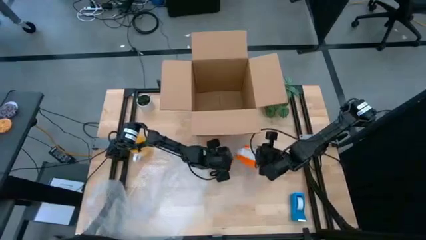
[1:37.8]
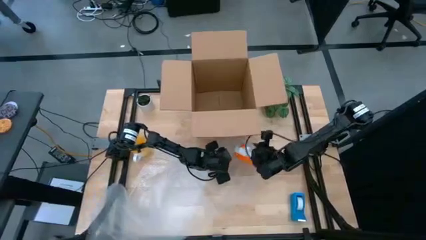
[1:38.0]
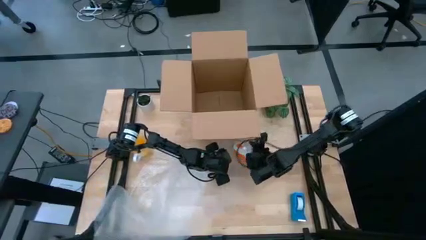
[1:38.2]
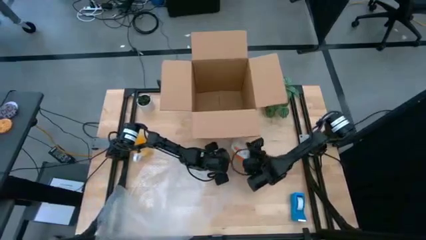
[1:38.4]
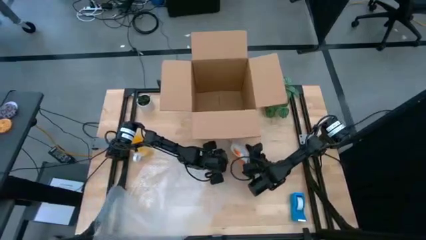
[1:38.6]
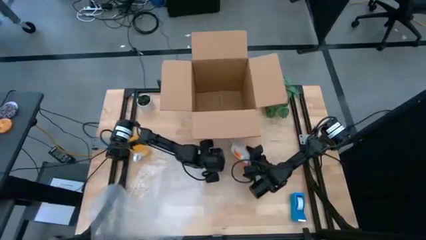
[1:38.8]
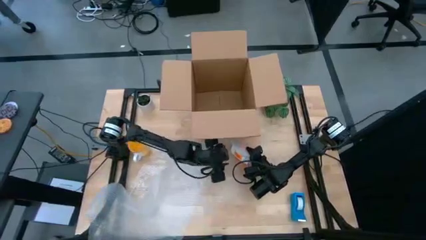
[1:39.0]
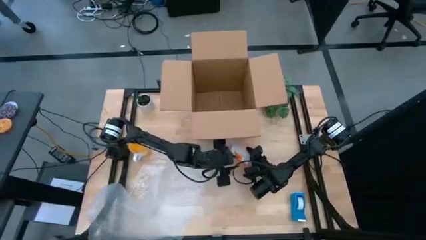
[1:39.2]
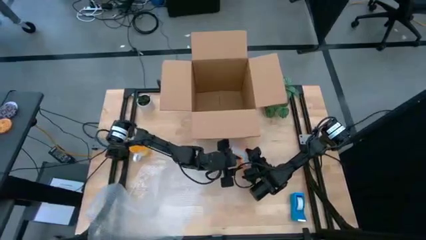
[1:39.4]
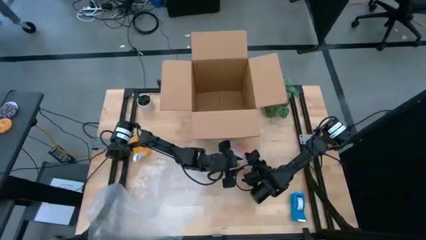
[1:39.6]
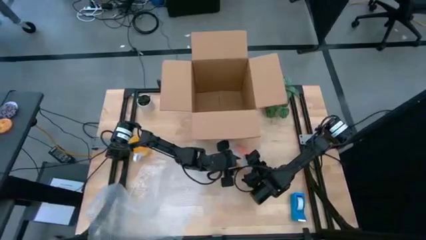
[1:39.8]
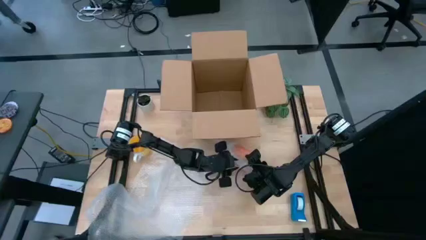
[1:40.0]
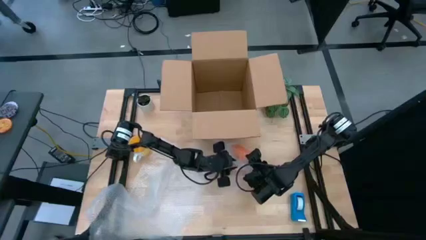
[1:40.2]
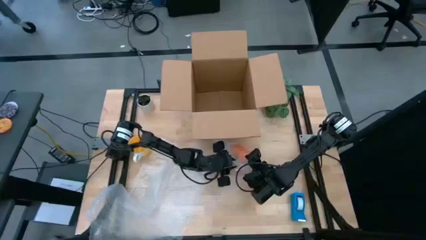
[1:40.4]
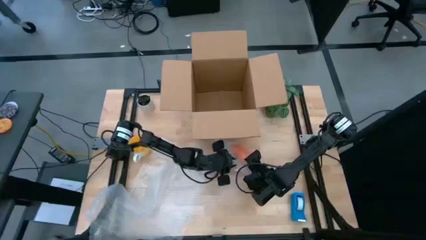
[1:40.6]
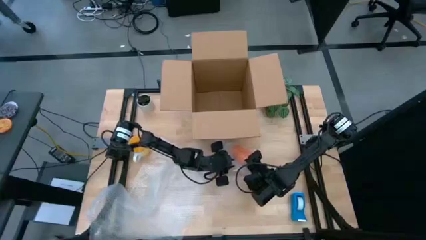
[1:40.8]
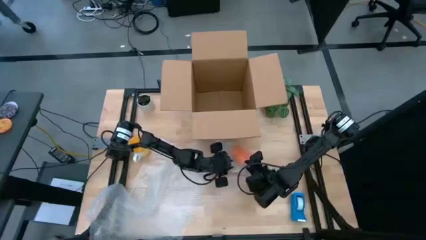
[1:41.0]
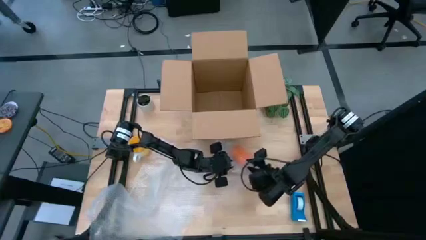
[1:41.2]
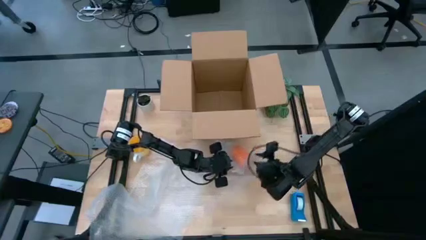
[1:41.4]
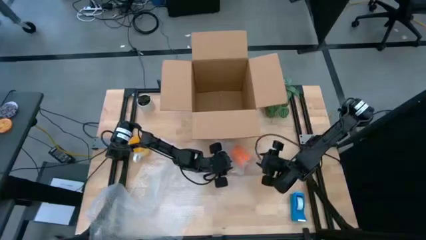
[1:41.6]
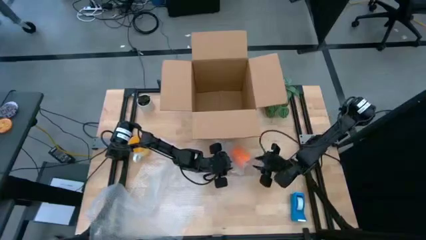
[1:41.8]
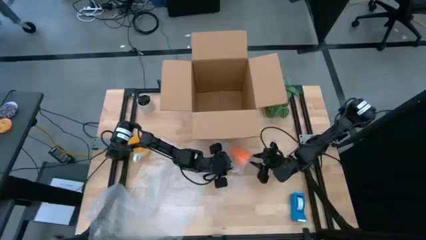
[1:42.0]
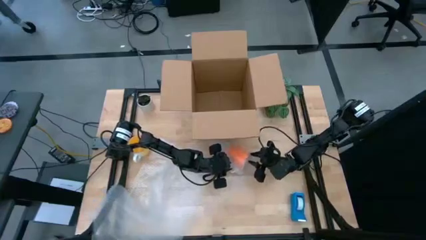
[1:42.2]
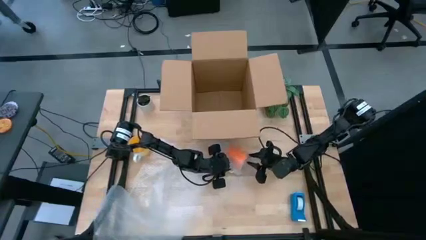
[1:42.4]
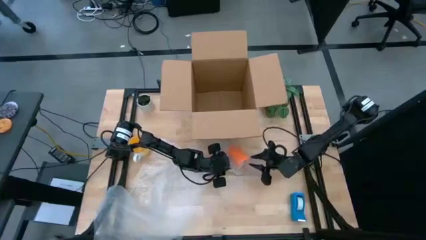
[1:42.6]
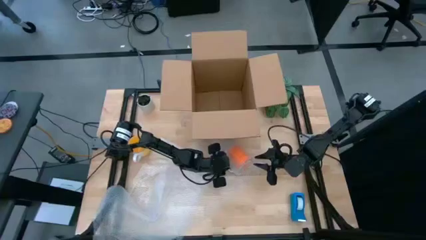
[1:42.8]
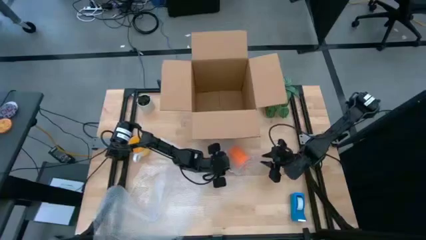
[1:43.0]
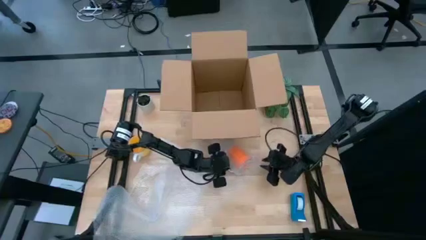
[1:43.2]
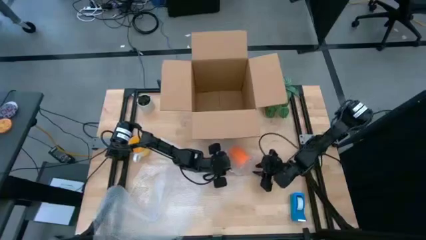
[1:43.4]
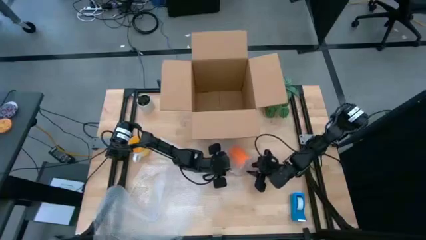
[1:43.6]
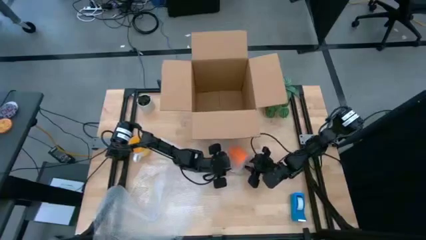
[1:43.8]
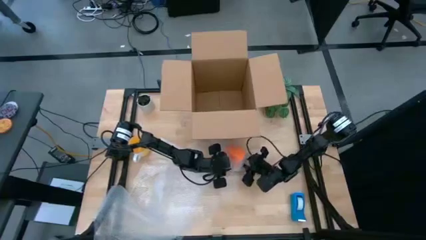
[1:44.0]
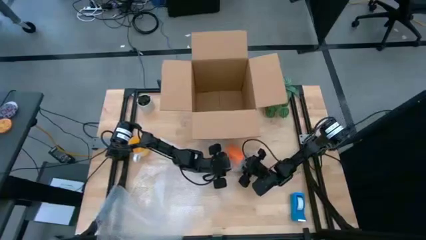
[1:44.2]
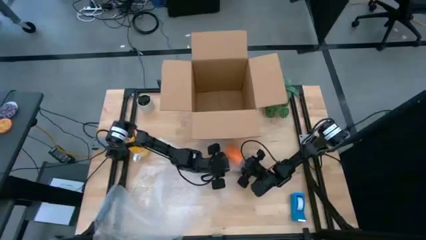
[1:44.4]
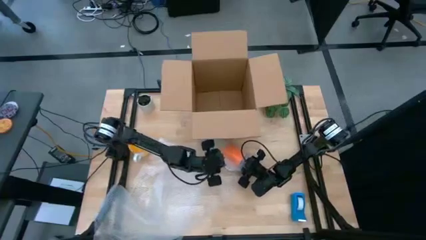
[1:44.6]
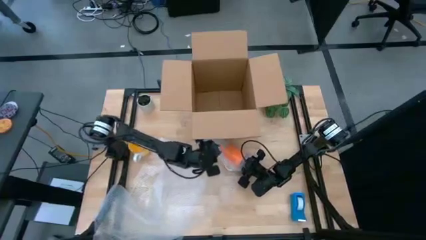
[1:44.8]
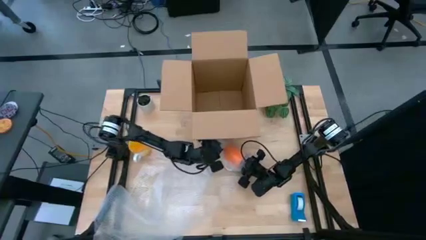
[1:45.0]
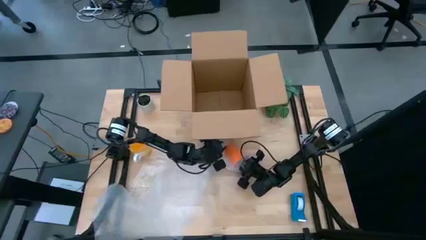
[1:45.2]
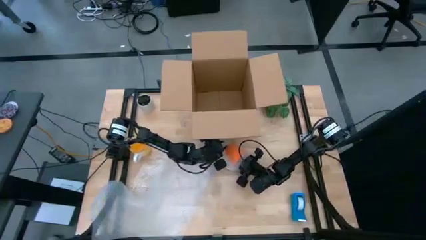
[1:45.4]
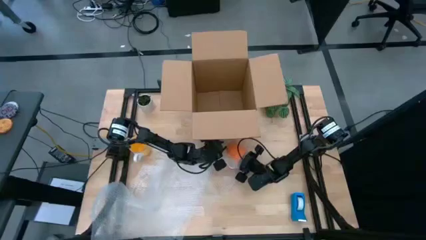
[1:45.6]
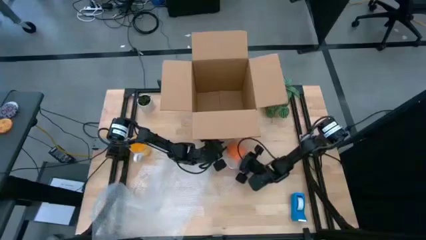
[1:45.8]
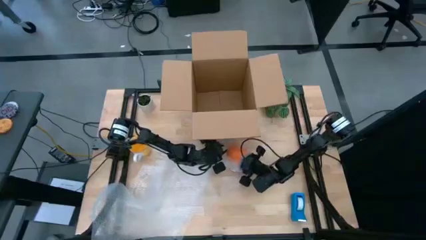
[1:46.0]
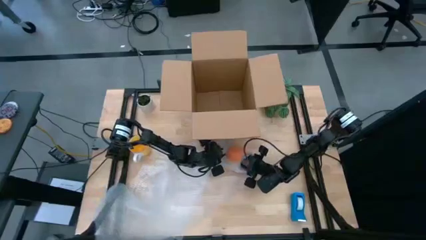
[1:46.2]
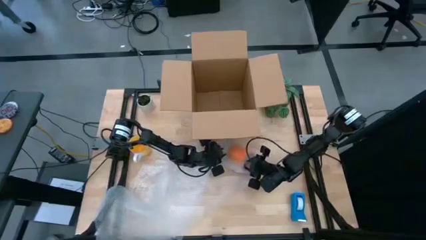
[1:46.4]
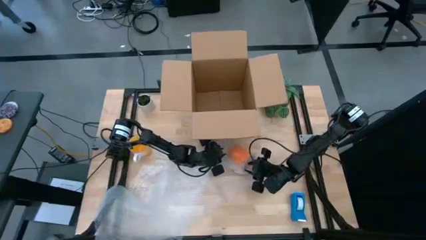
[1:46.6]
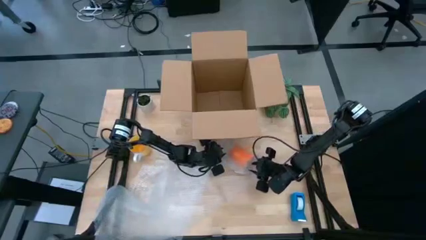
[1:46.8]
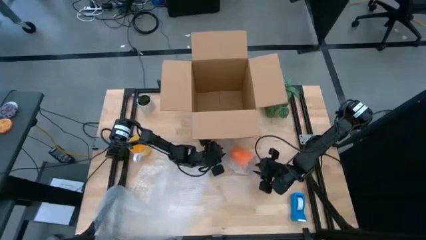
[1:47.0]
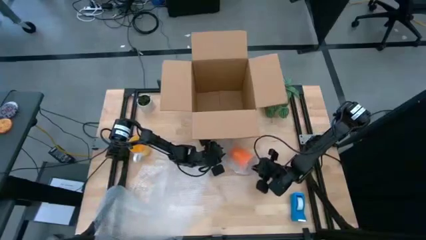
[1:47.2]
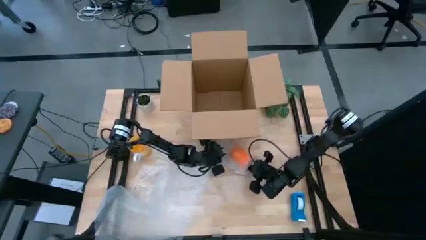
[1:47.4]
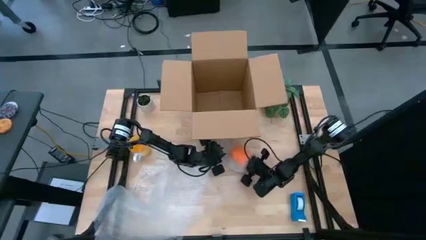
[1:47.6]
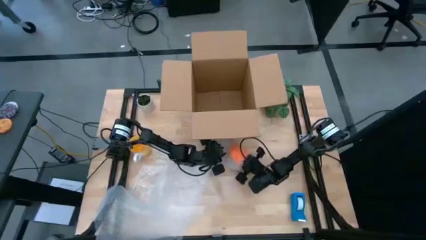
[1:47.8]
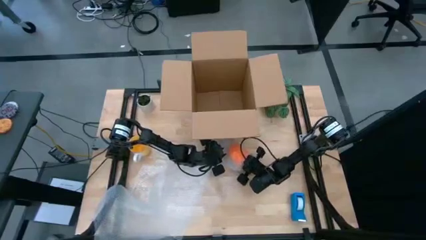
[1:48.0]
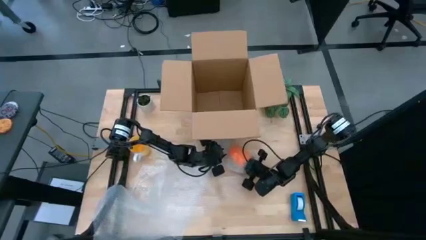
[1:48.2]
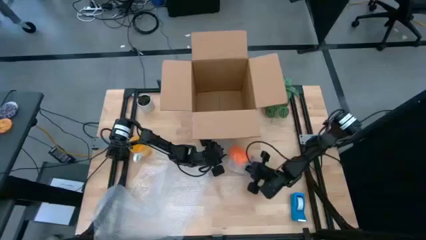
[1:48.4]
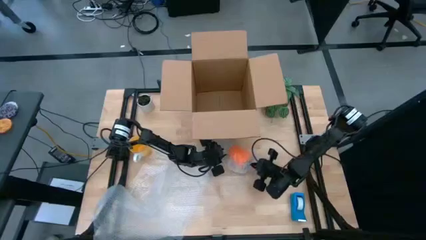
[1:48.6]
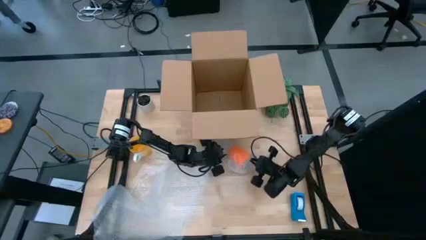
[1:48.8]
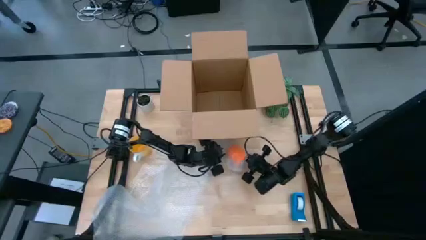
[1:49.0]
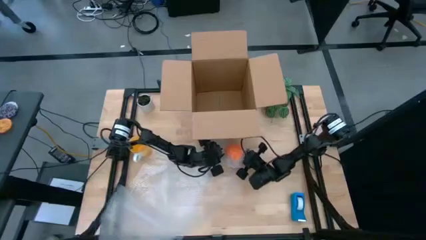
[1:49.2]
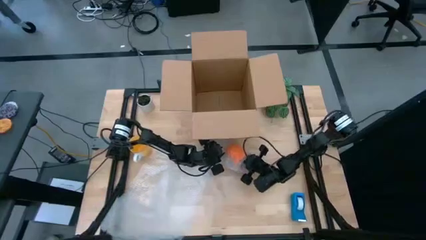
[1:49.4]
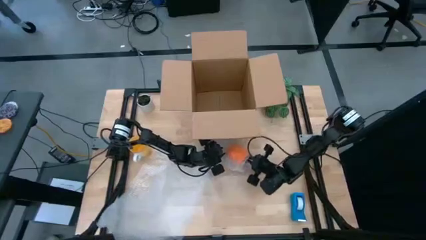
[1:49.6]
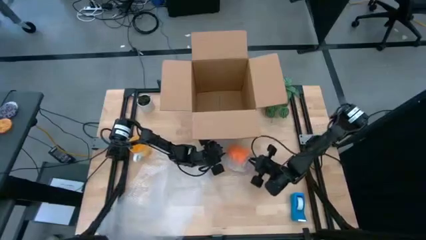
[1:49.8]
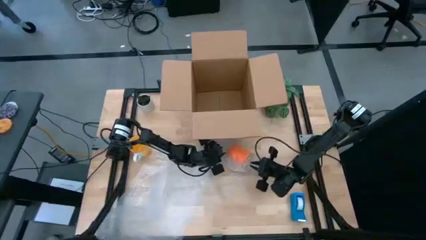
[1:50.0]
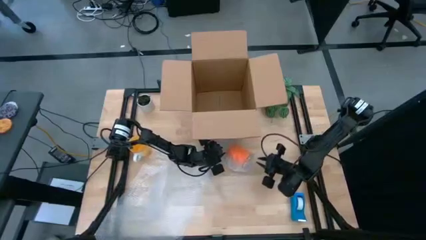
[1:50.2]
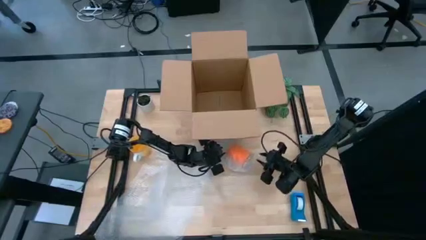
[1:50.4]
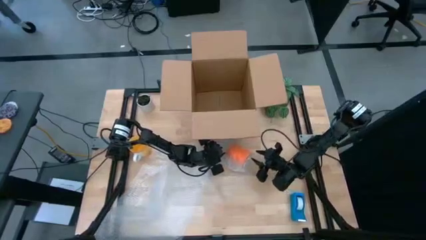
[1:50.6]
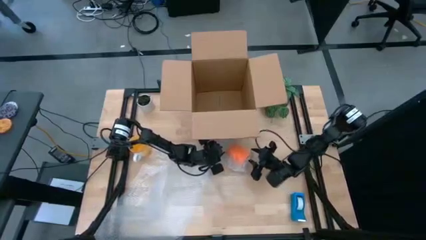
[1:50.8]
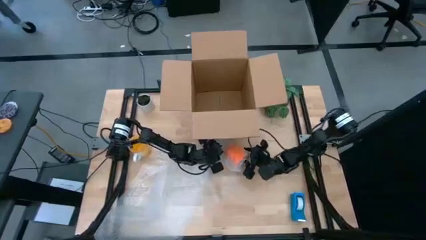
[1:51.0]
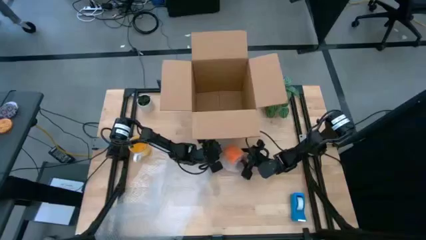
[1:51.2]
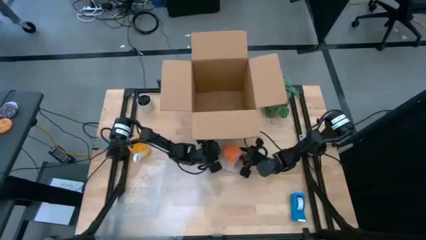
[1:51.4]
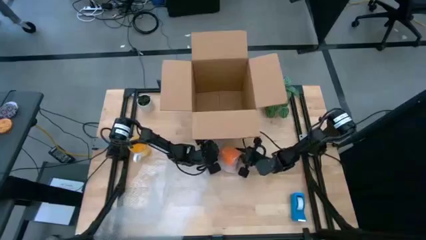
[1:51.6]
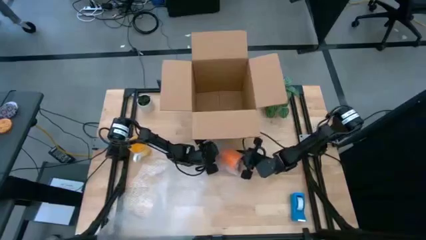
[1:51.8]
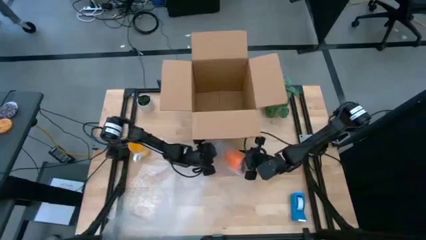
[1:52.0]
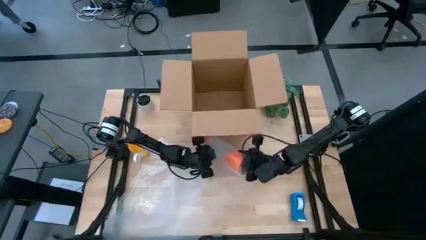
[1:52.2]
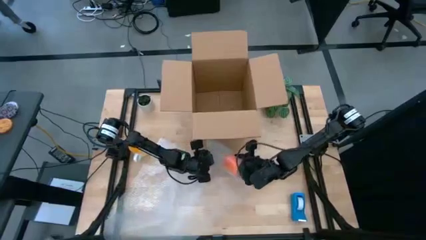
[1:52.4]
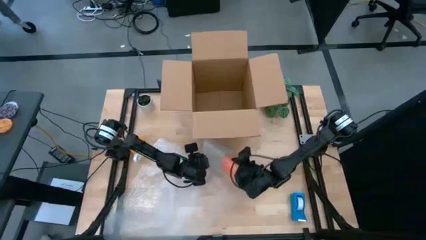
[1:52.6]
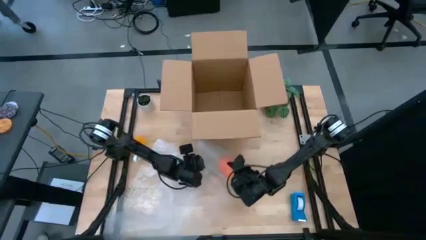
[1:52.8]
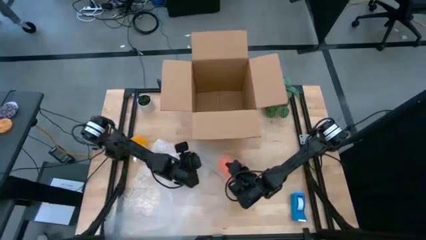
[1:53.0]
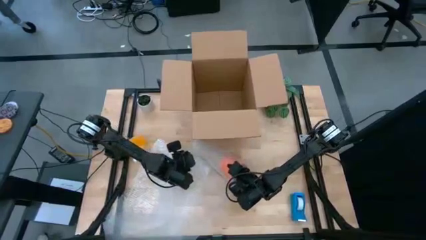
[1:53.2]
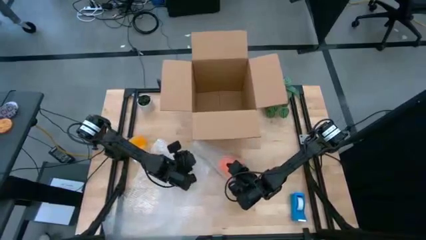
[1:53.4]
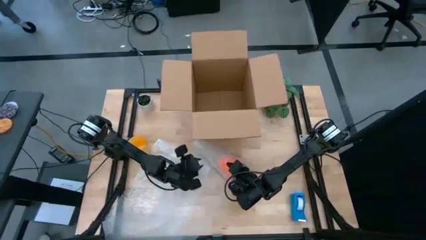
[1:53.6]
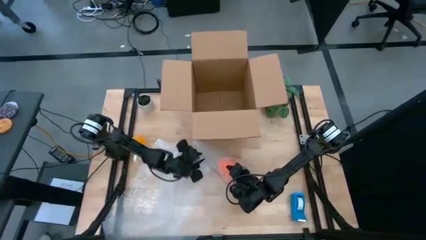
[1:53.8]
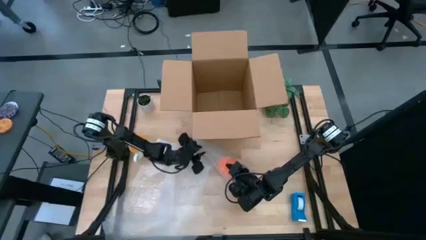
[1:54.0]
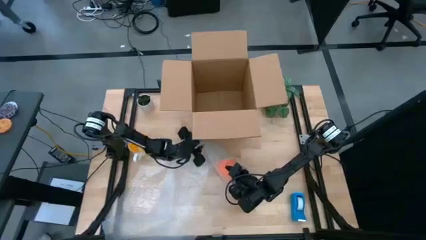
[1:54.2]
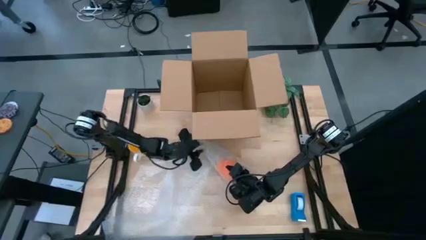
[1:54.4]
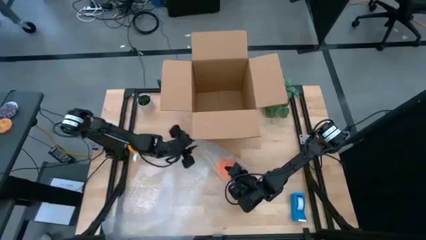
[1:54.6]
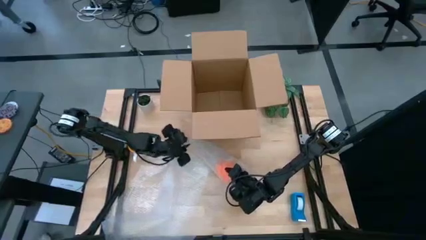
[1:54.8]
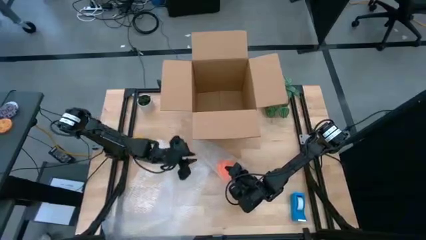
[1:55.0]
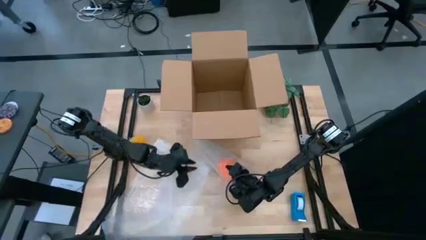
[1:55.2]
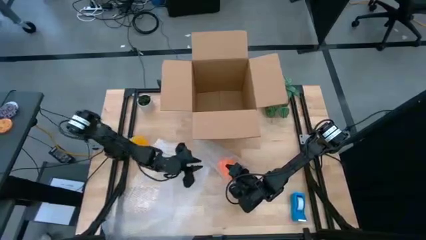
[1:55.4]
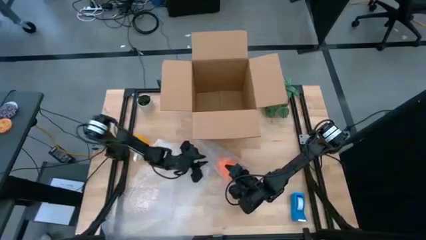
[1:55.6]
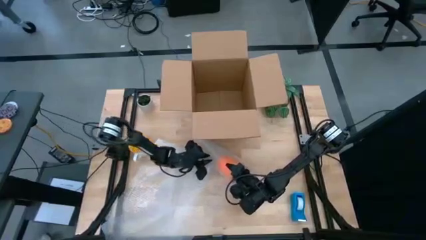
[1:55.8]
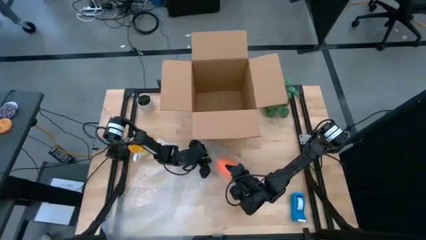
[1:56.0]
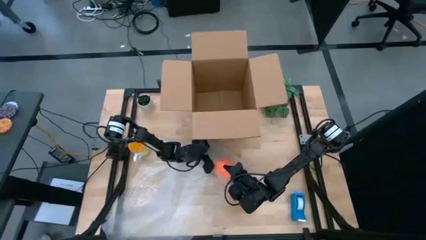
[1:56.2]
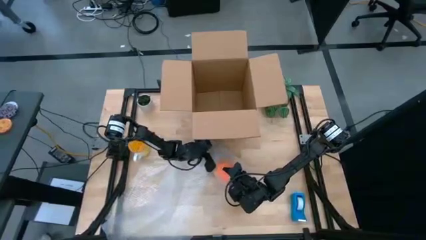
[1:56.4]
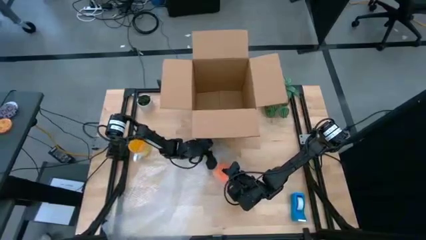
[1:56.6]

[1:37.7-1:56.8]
Task: wrap mug
Wrap the orange mug with the bubble wrap
